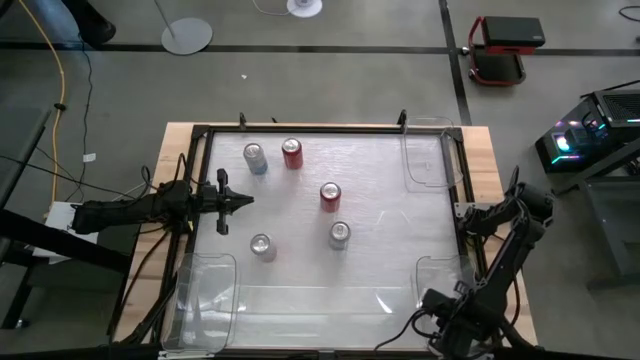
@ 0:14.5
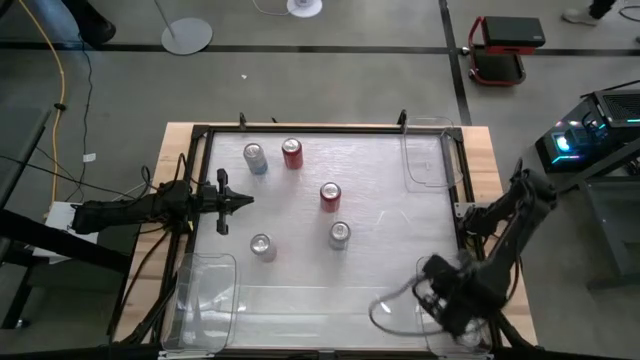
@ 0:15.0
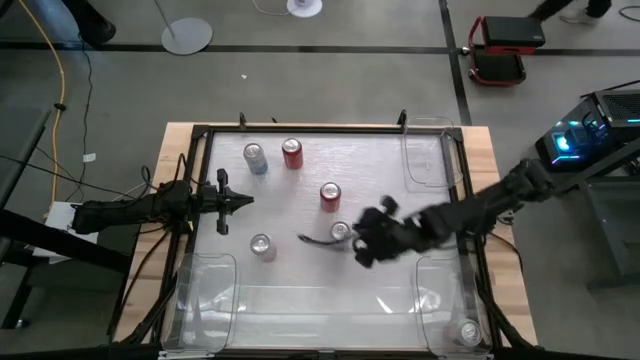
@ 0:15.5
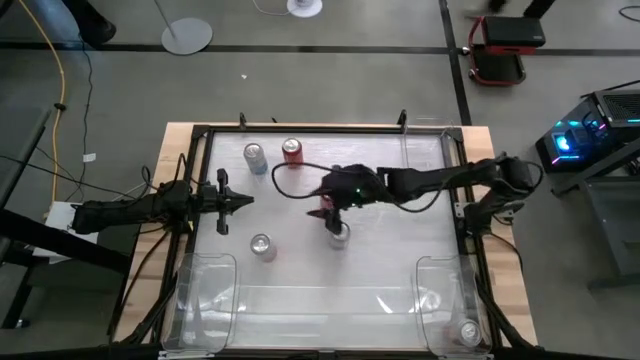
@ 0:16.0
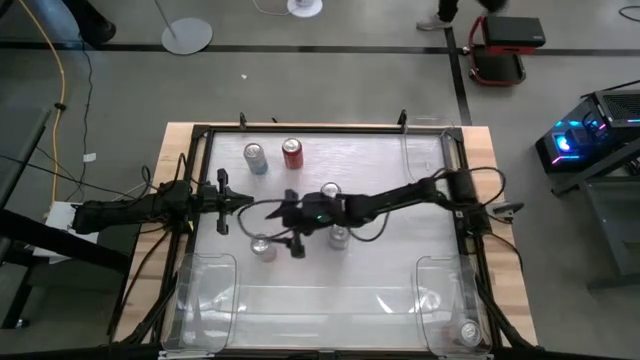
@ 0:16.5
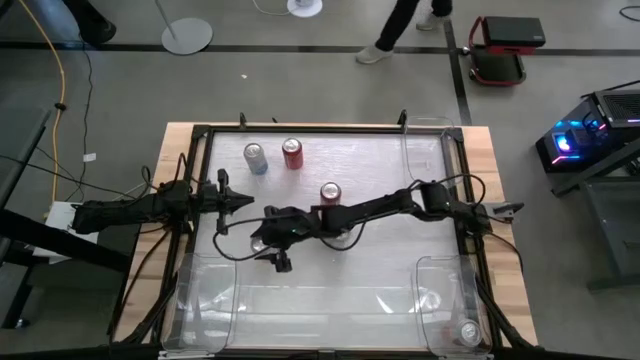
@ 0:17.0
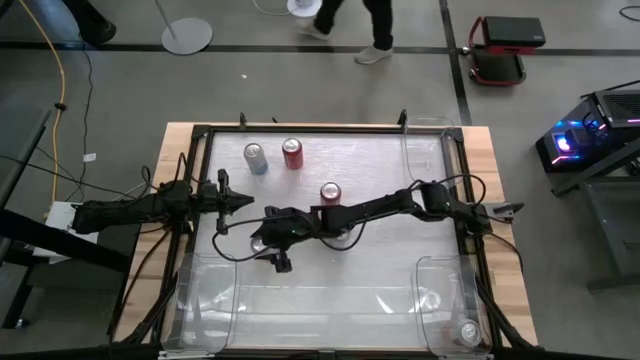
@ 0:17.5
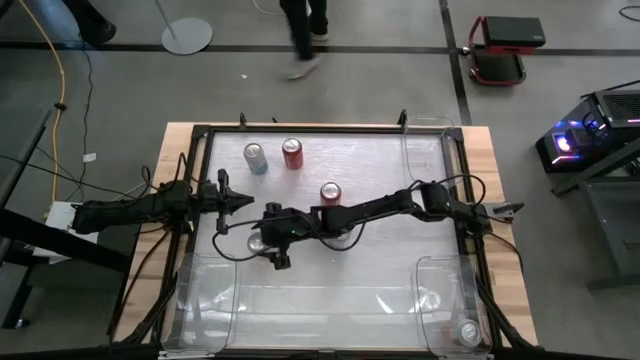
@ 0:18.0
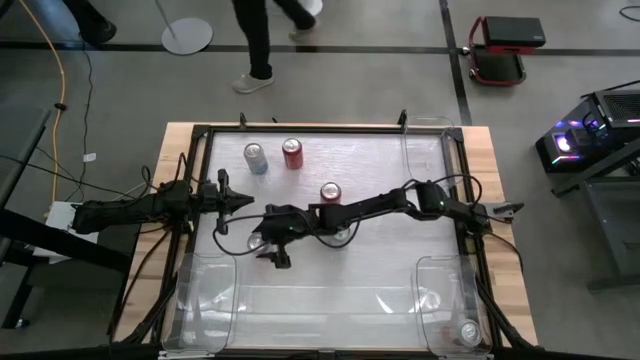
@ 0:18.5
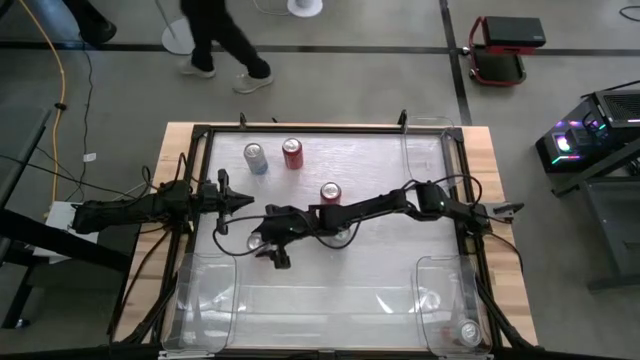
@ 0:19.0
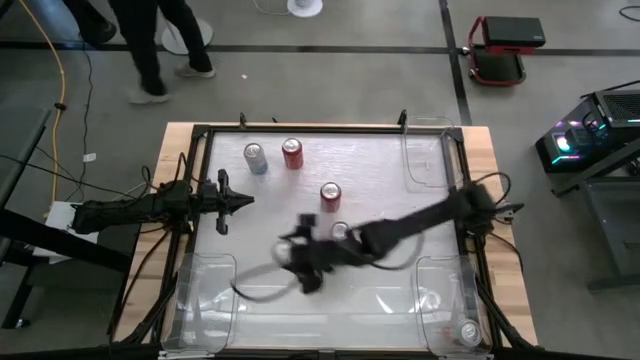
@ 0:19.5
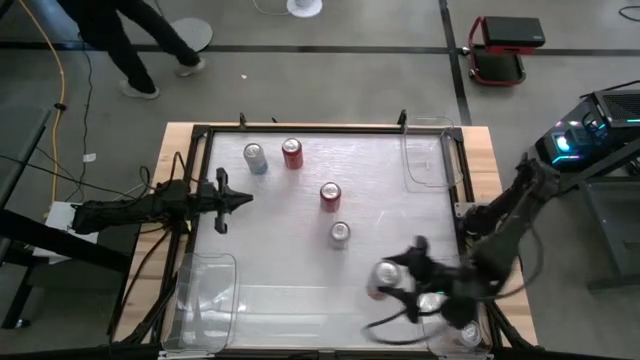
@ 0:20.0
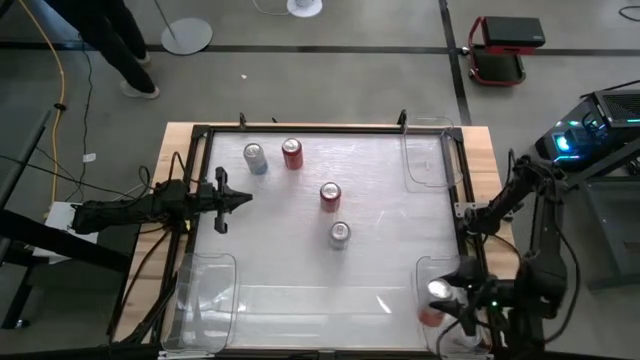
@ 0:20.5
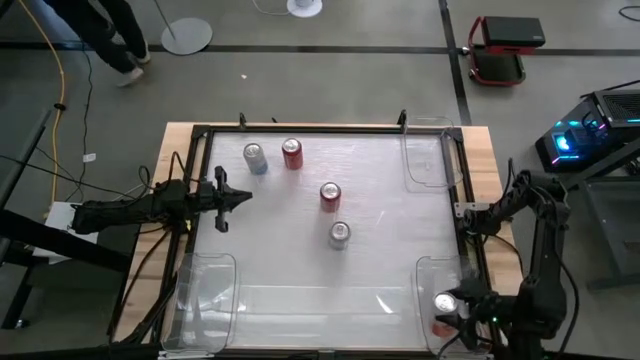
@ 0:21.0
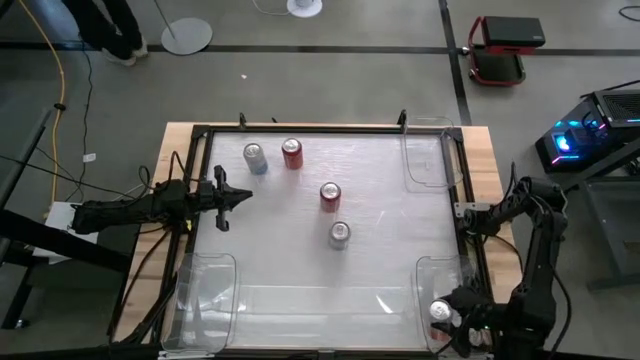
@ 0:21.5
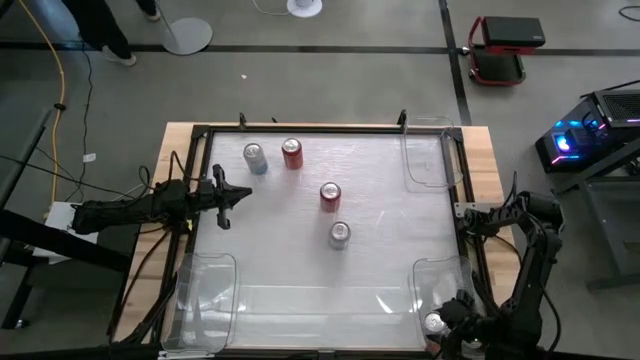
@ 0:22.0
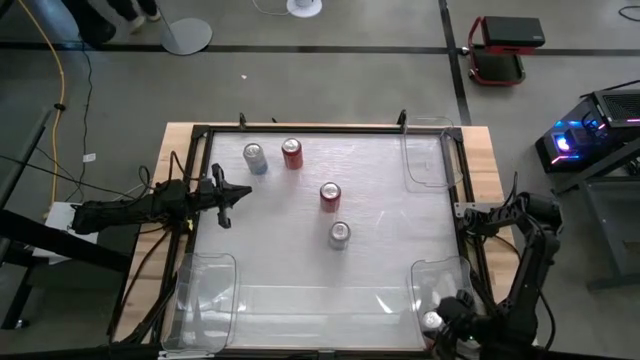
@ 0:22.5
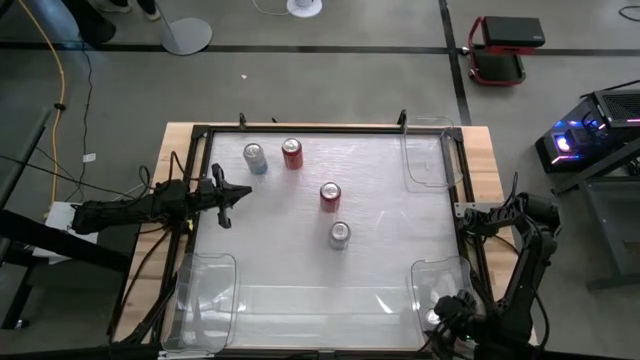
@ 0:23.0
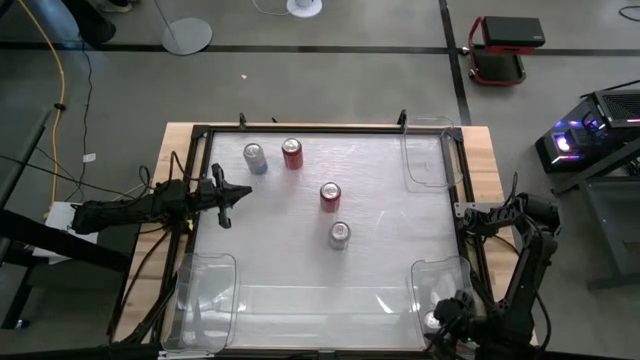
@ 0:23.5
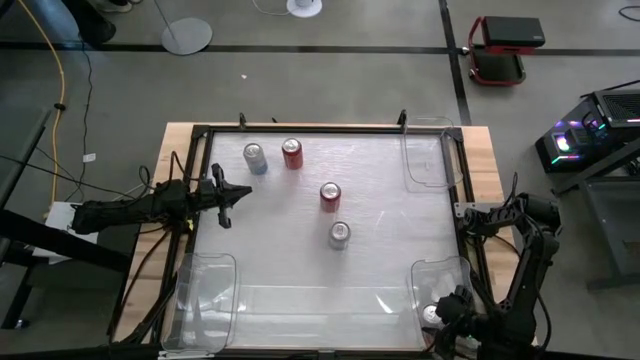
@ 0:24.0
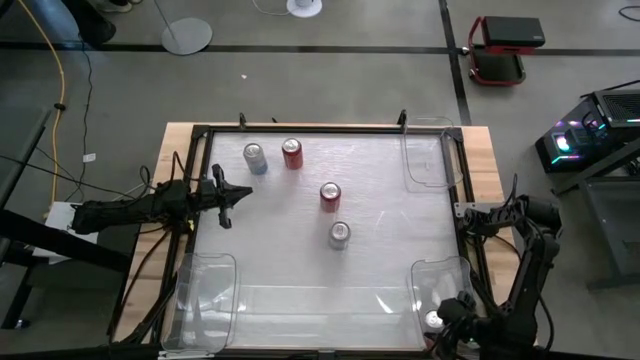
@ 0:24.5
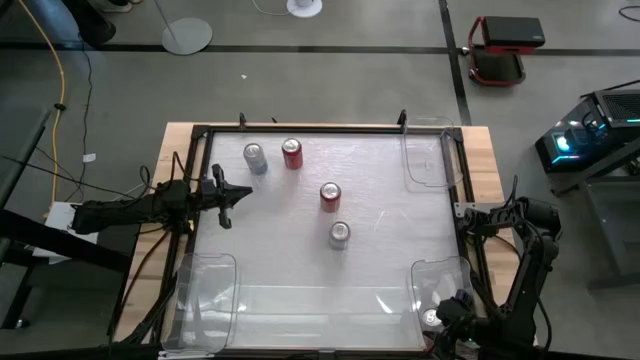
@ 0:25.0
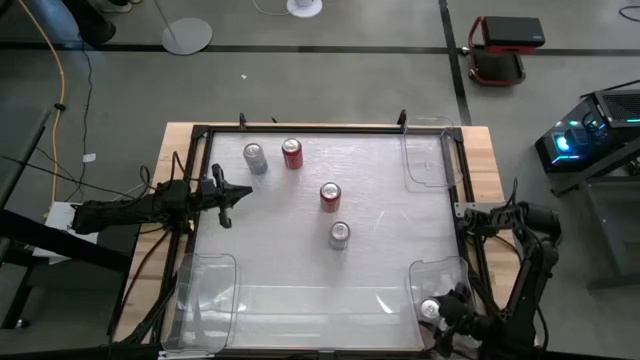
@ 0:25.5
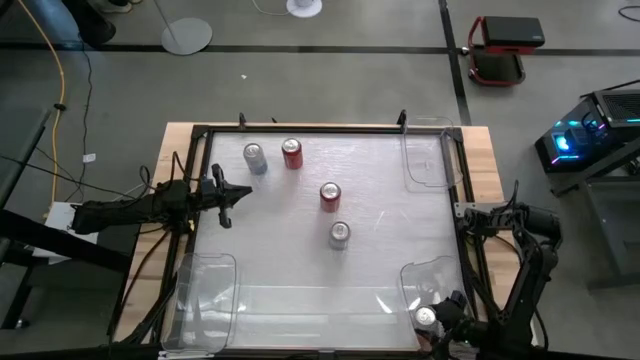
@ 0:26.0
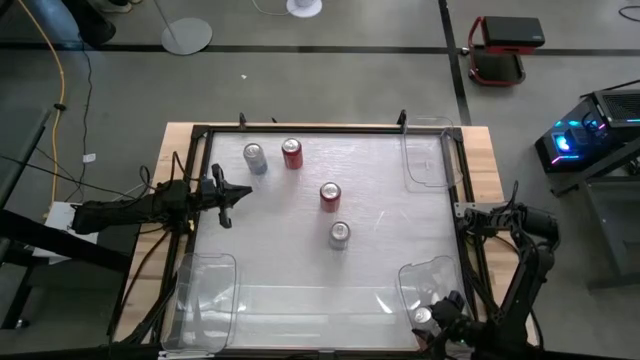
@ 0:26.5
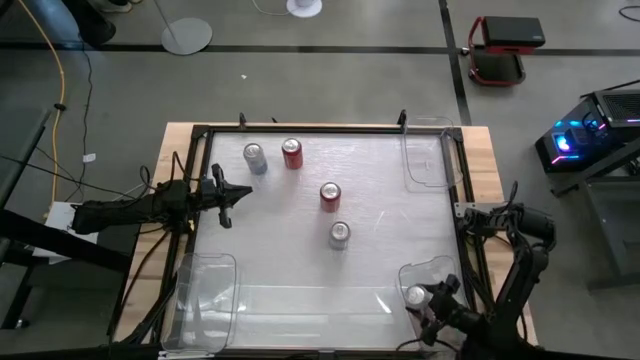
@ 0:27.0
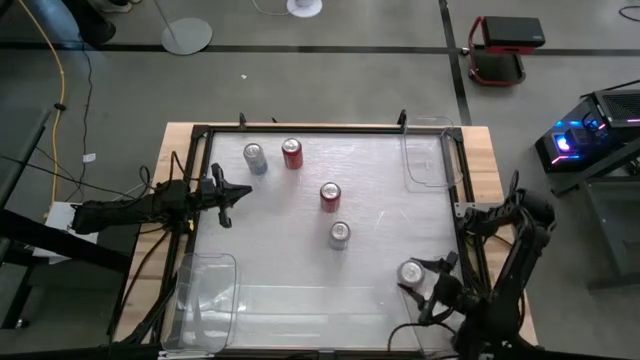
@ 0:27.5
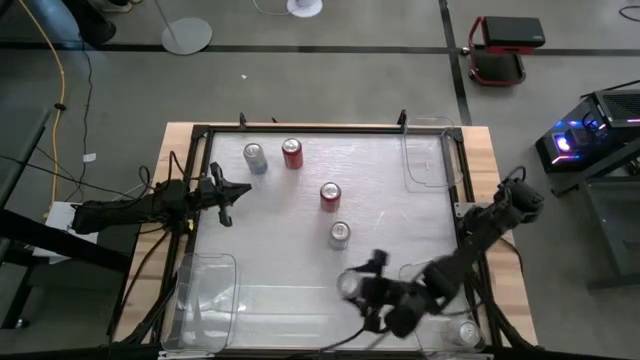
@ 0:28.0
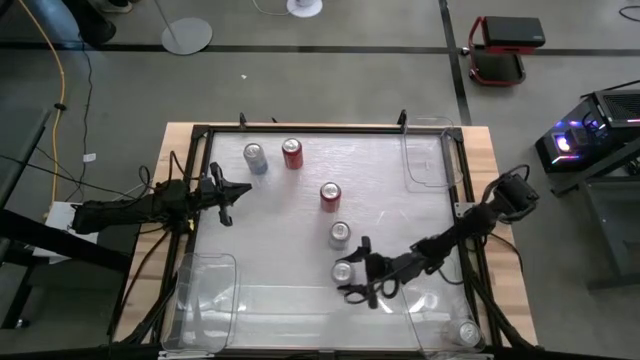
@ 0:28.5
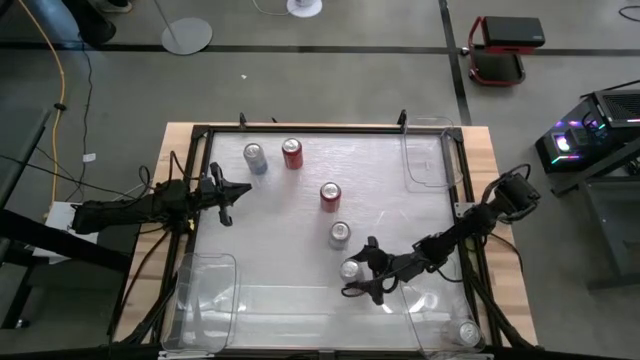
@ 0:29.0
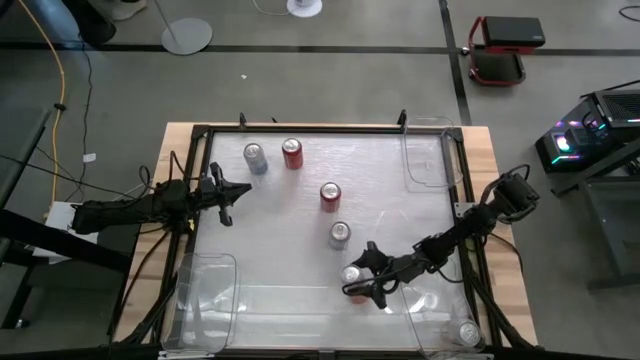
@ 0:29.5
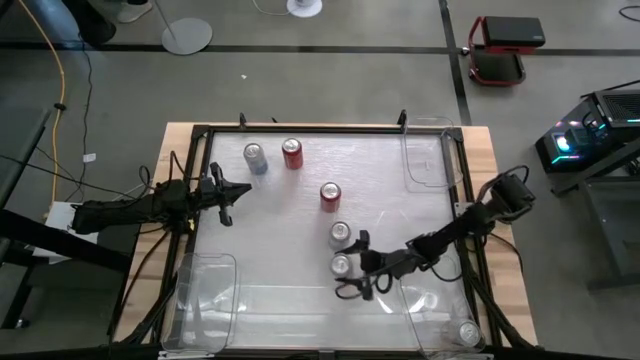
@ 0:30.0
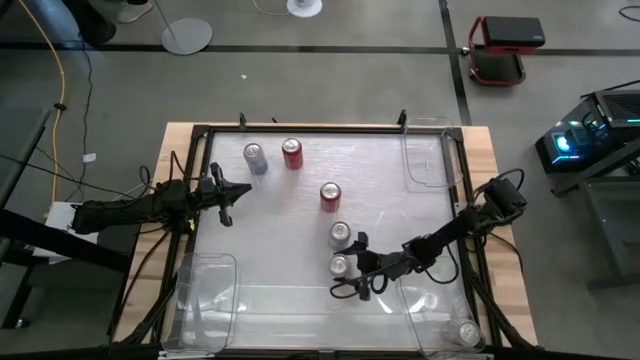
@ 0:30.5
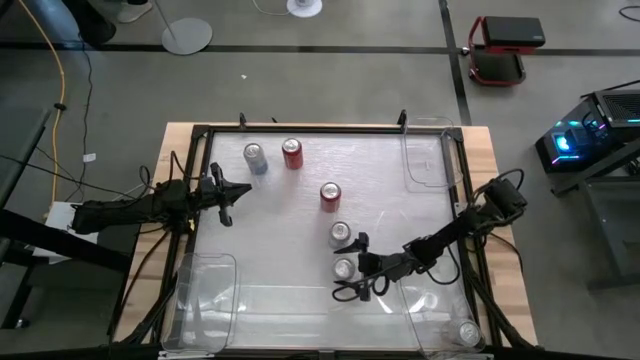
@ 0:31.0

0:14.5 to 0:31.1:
Task: Sort soda cans
Put the orange-white soda can into the bottom right transparent bin

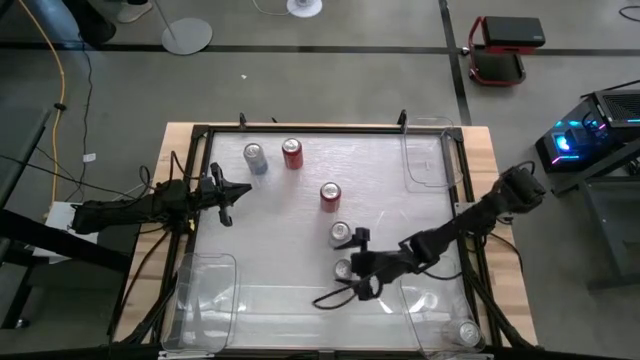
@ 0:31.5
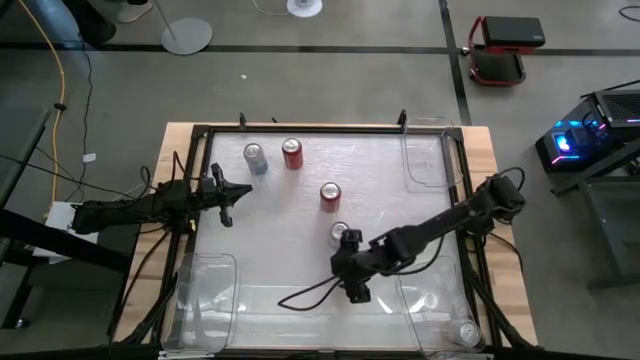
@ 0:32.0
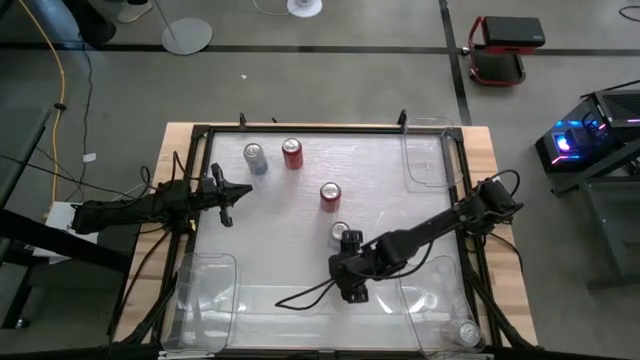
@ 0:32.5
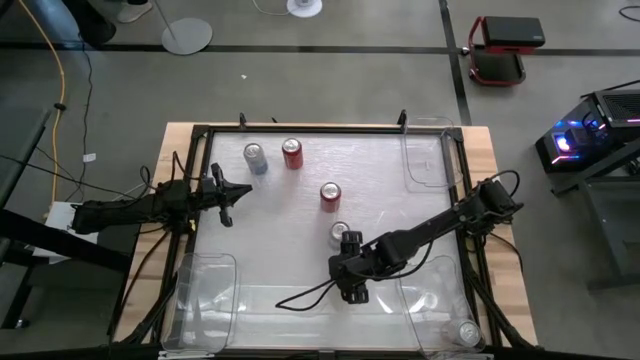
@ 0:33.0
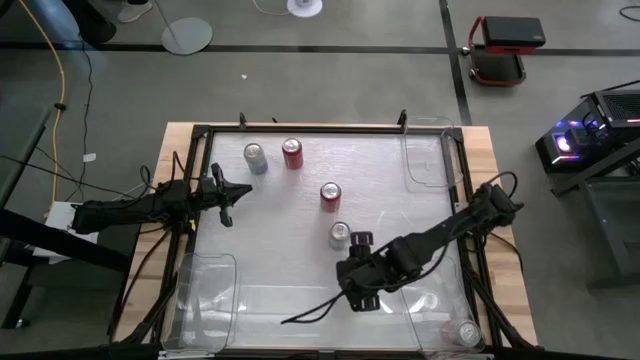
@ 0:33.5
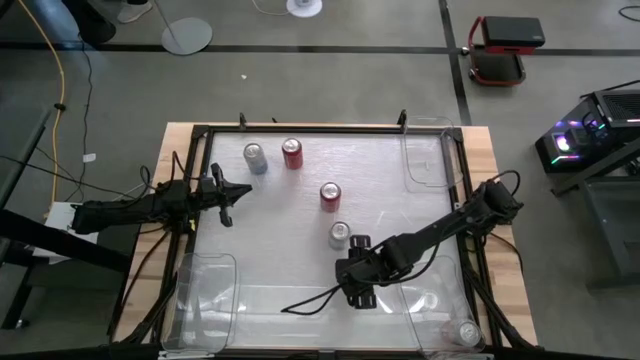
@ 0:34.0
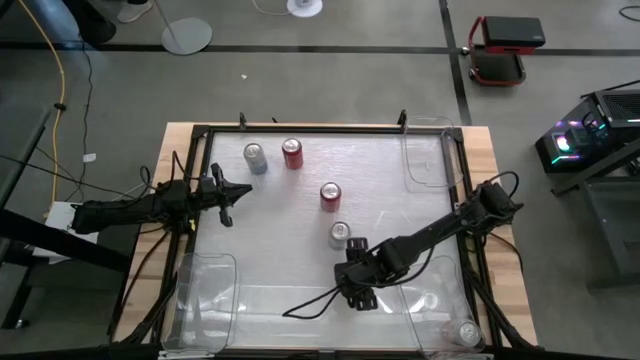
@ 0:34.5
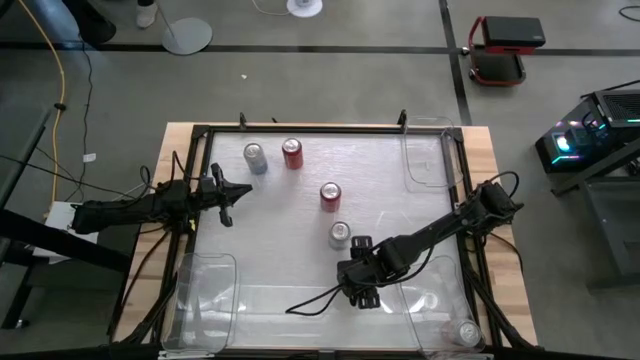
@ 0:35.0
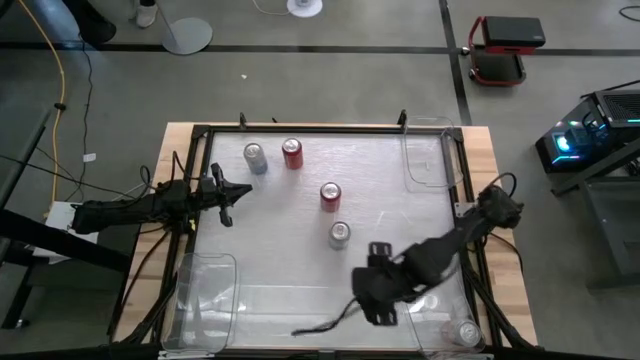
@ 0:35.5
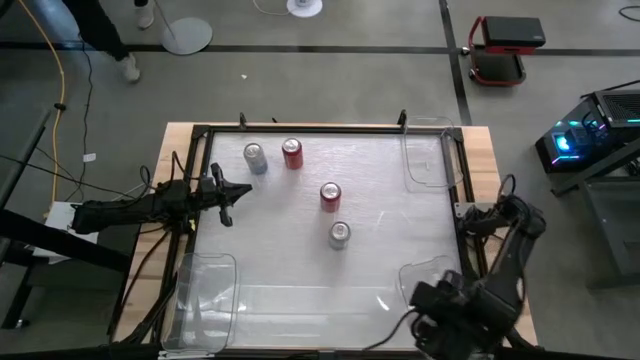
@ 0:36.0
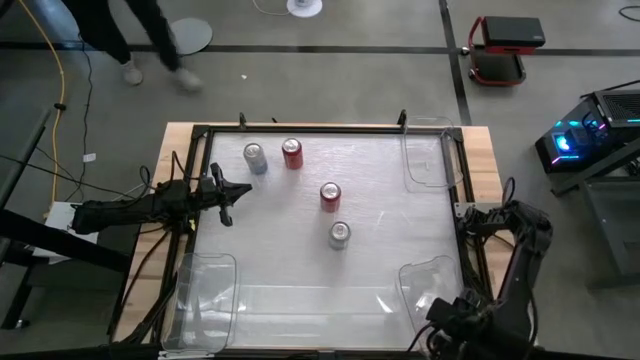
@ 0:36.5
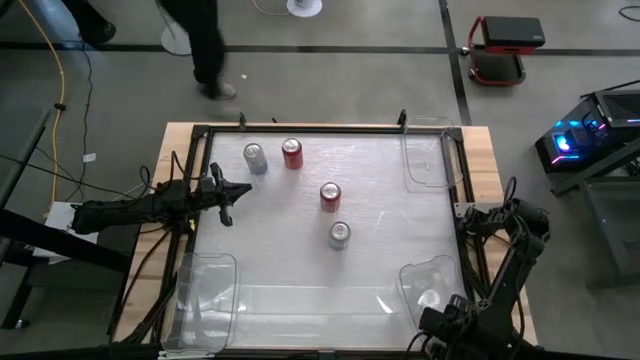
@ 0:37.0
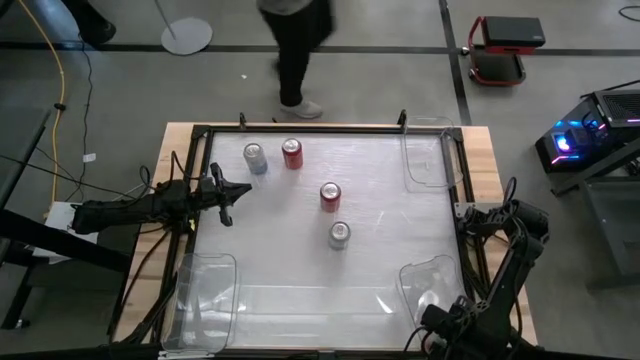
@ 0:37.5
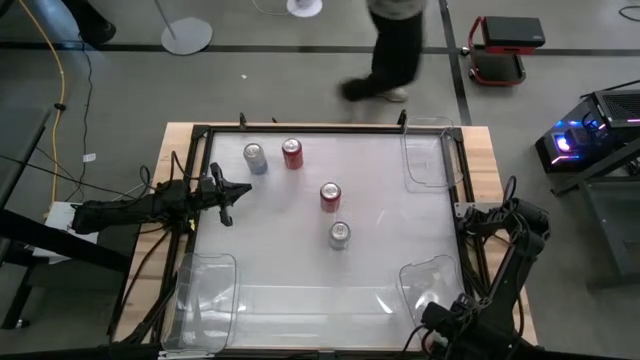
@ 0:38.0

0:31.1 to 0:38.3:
Put the orange-white soda can into the bottom right transparent bin
